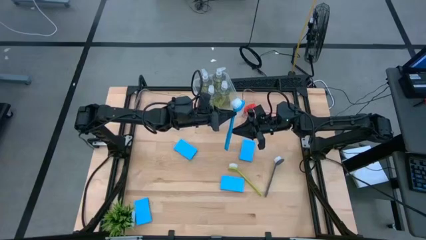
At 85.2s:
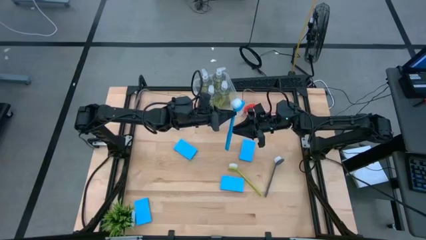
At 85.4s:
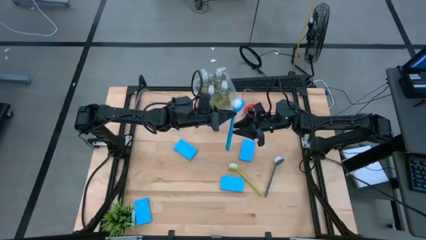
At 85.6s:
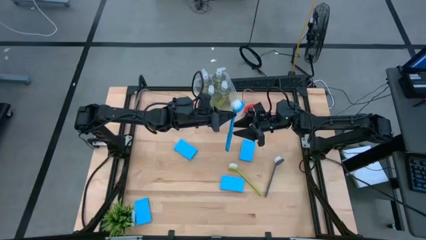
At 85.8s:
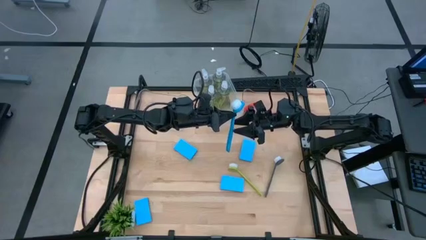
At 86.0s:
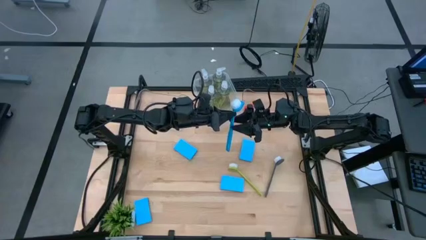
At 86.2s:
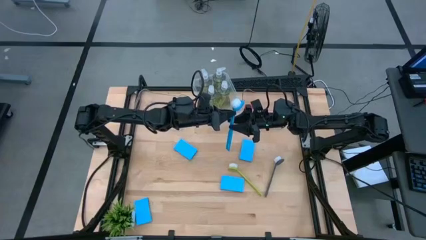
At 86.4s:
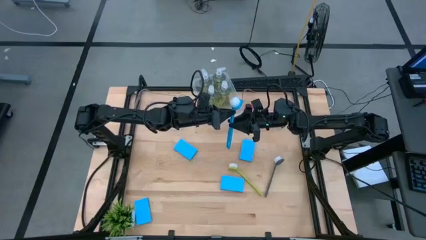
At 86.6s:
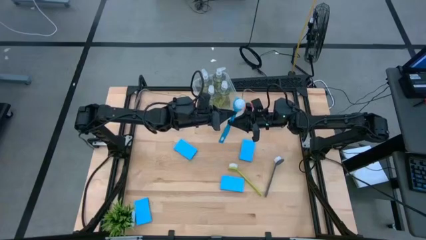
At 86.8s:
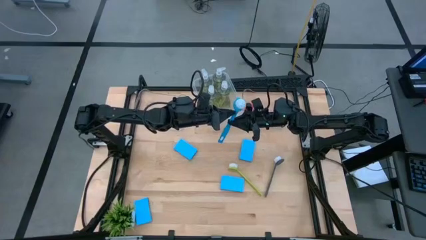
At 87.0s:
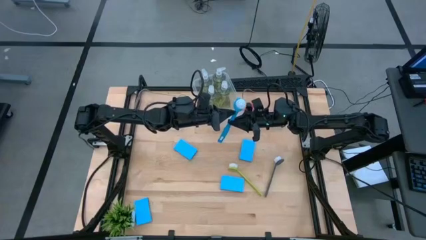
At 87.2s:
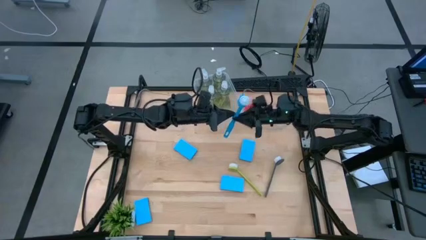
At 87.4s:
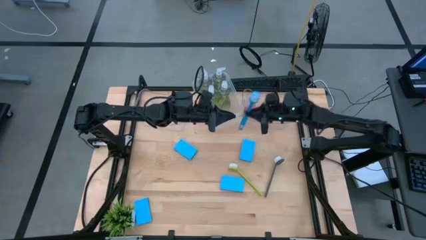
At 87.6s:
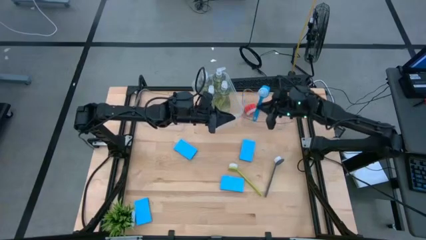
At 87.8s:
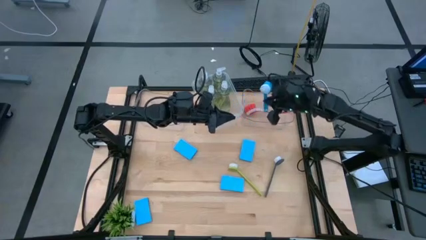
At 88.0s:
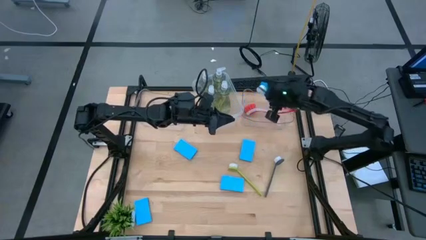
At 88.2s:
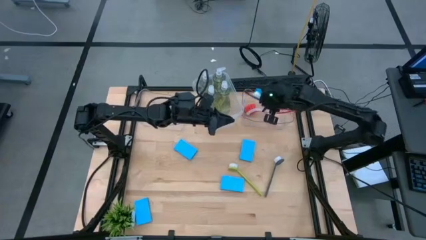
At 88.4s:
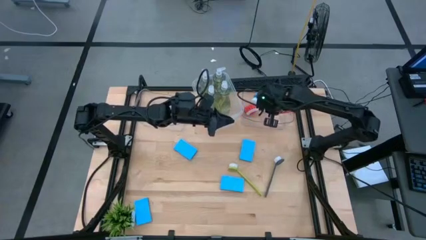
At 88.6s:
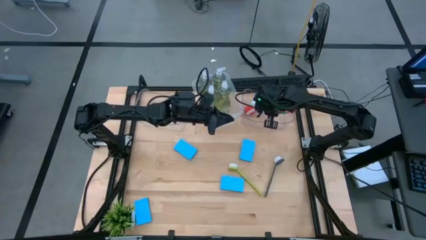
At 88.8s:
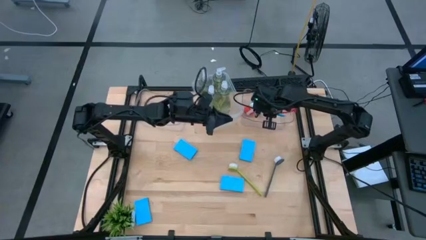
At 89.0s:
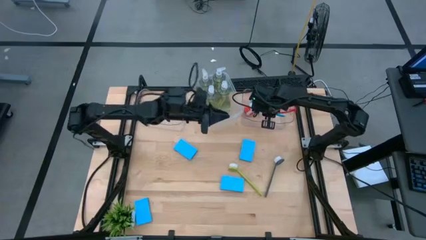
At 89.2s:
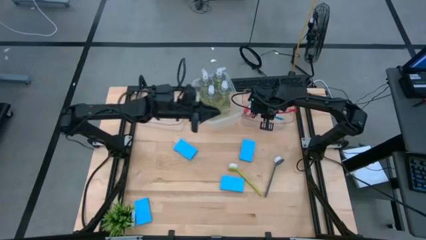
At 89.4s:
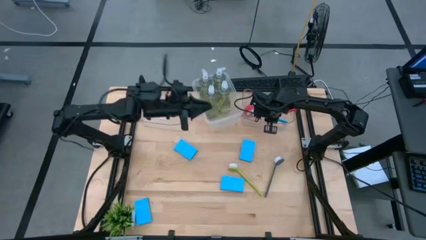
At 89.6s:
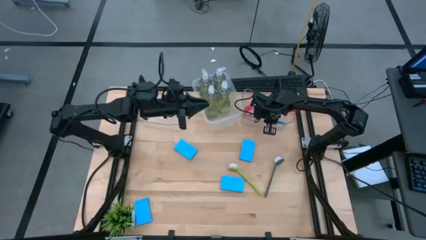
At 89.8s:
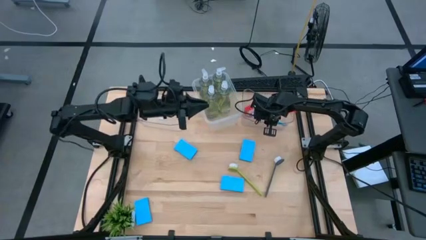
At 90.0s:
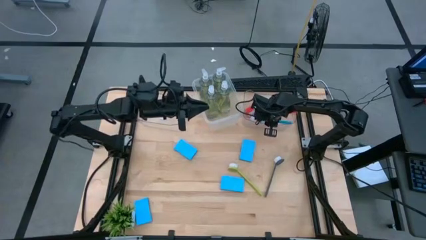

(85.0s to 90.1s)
Task: Pick & Place Kitchen Sink Supplies
Put the blue dish brush into the right transparent bin

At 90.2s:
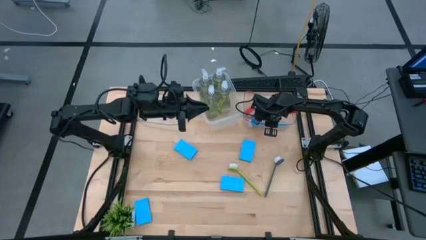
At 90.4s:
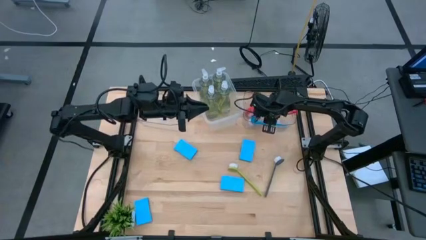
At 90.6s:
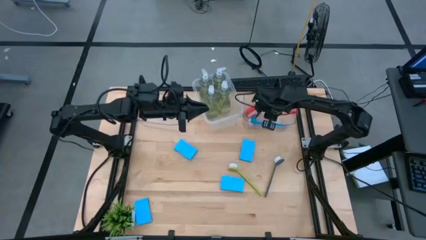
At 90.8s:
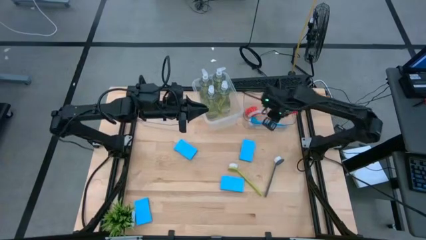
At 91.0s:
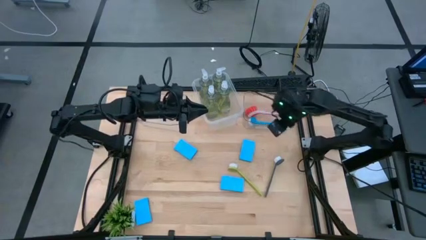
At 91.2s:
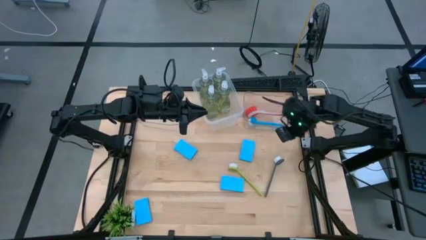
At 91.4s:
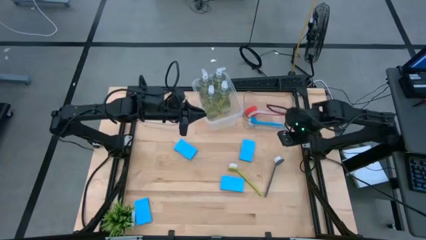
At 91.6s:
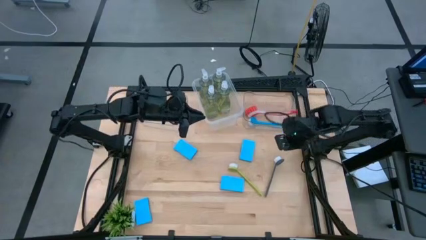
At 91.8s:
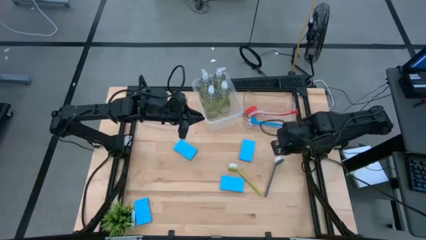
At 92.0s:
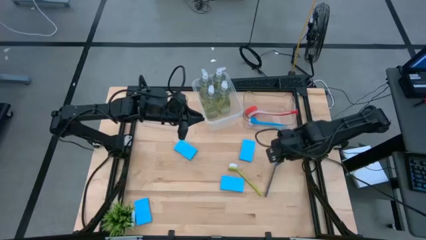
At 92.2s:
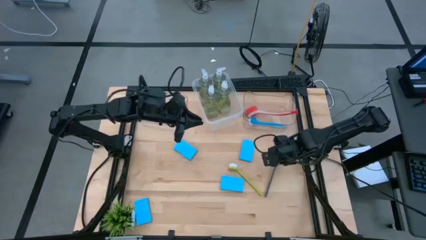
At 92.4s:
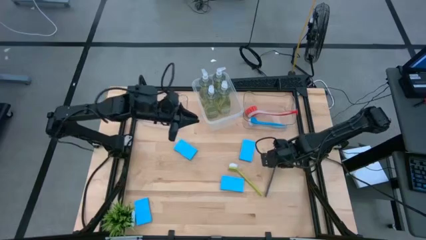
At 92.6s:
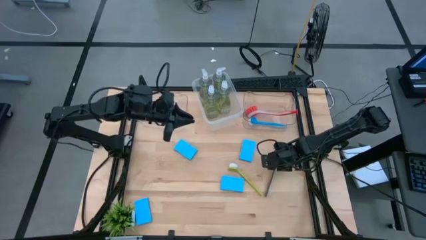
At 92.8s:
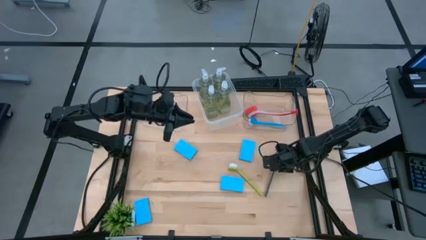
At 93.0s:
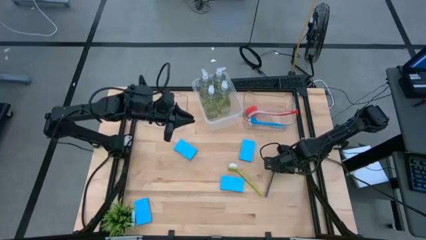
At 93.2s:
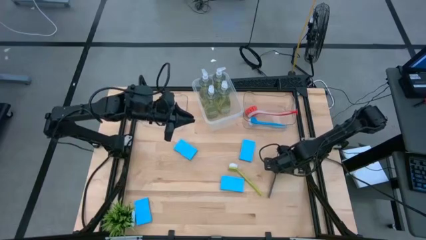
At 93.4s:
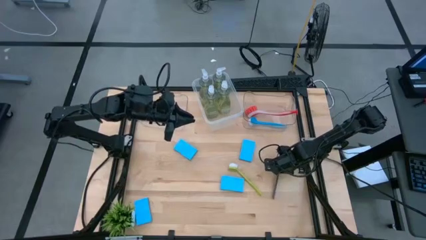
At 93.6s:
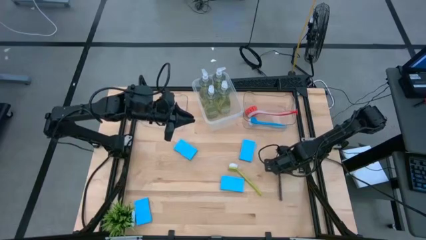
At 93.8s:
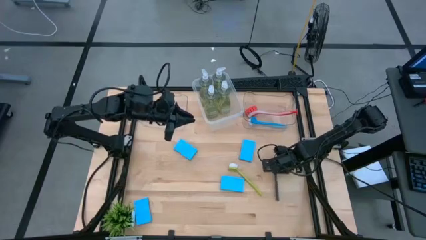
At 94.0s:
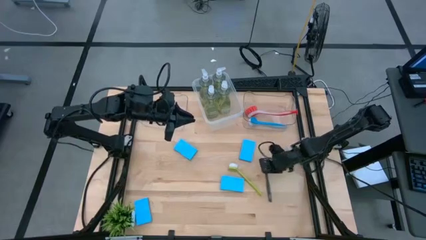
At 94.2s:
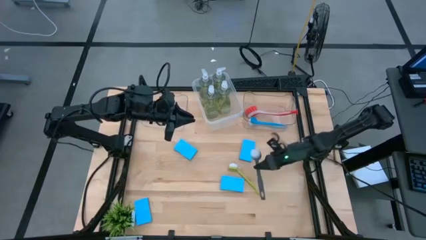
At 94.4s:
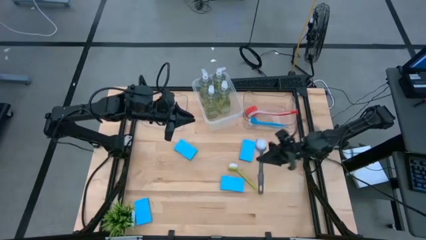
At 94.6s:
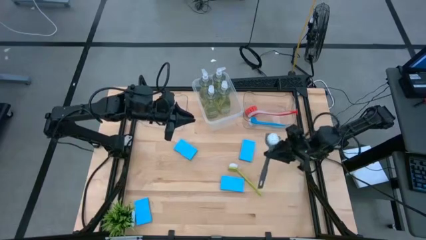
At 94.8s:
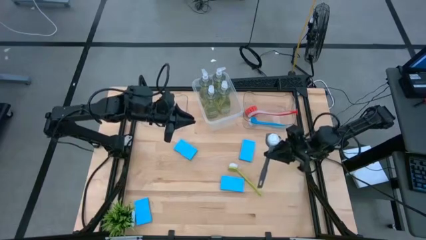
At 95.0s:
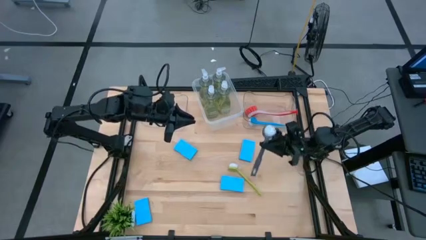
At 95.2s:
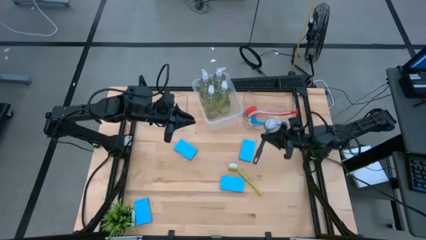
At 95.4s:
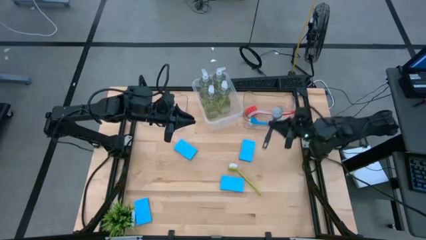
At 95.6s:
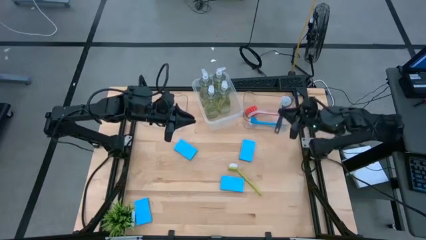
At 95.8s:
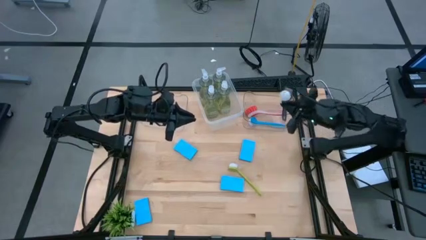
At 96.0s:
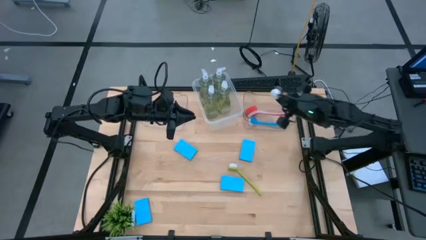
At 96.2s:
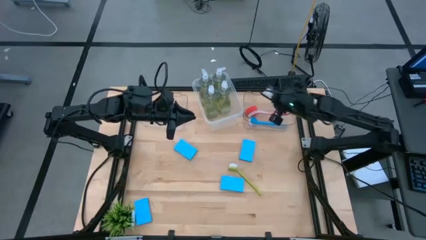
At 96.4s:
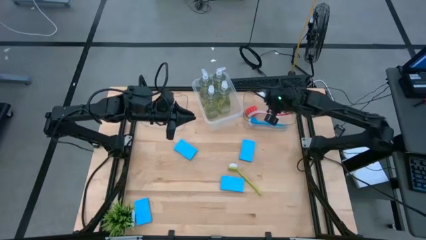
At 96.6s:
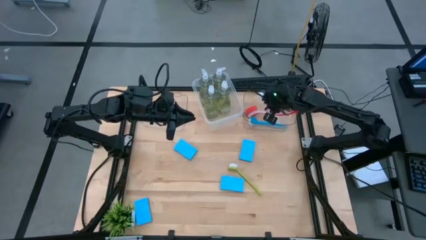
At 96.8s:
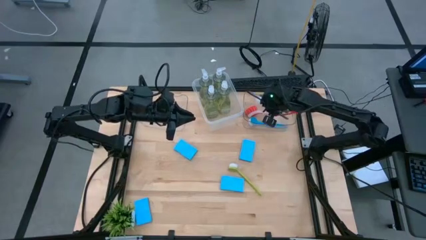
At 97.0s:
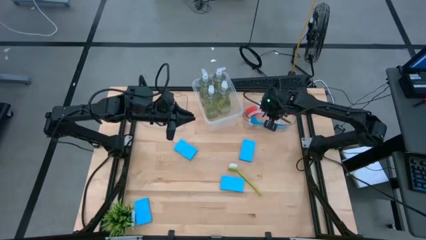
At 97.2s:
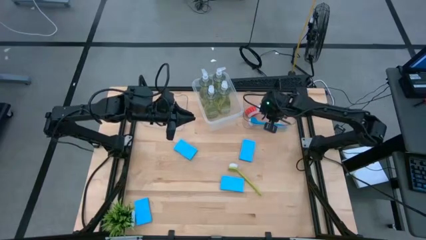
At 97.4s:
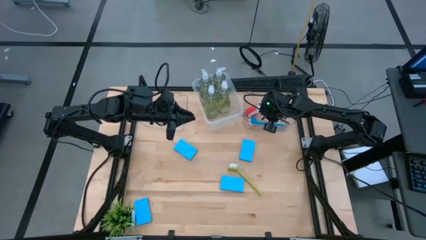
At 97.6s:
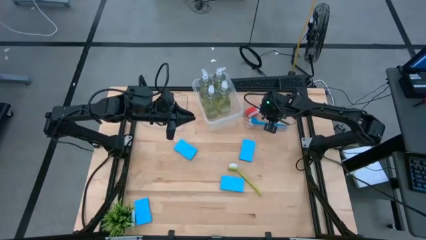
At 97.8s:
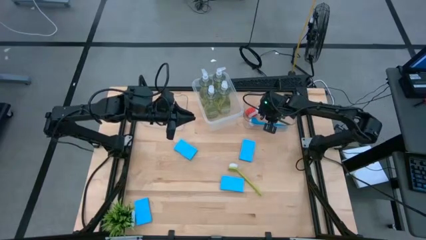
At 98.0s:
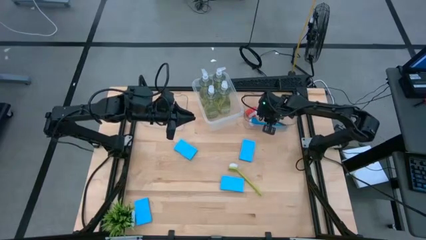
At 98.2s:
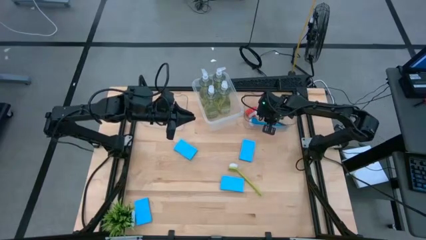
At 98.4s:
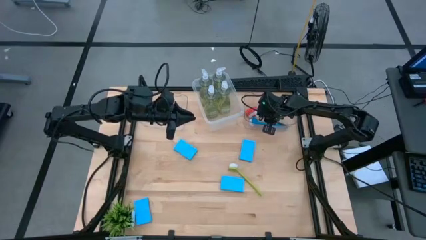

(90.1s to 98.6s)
Put the gray dish brush into the right transparent bin
